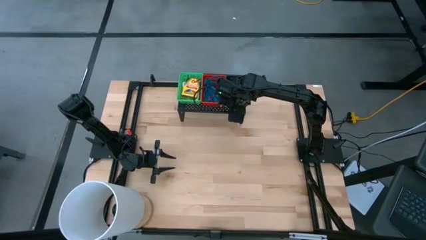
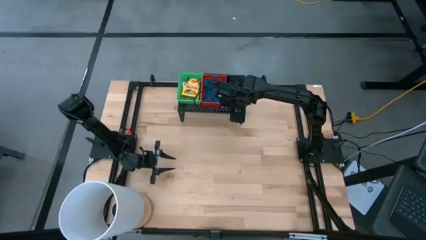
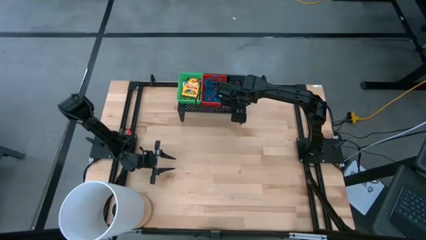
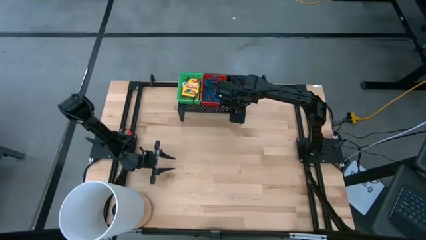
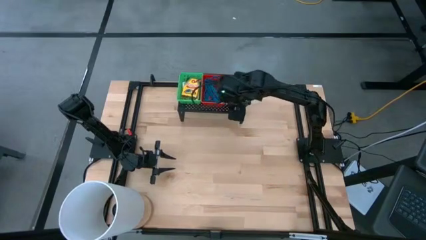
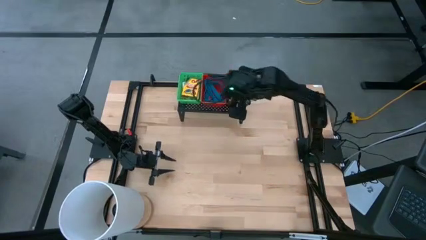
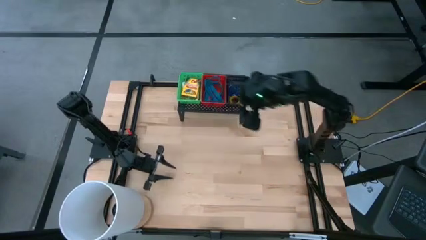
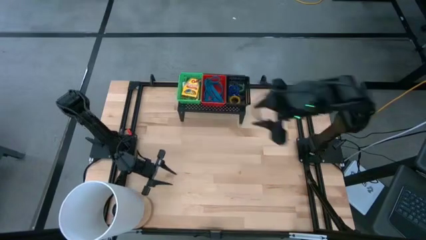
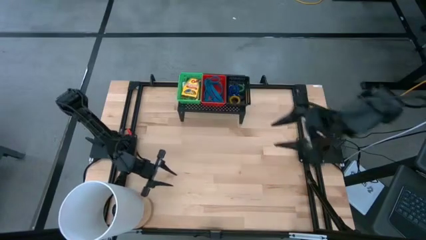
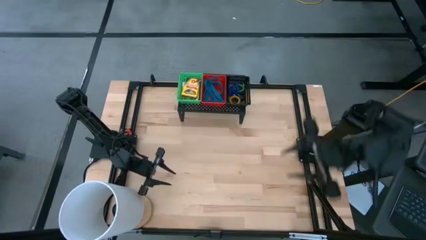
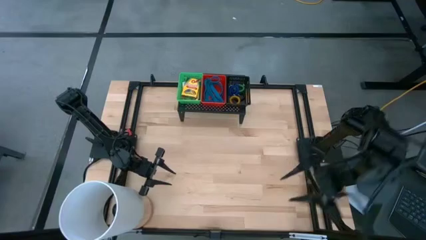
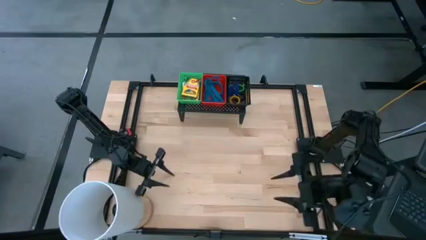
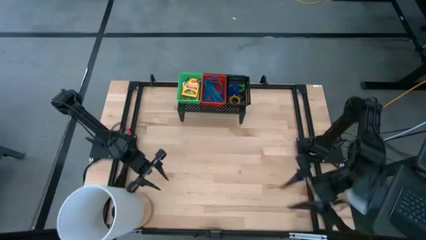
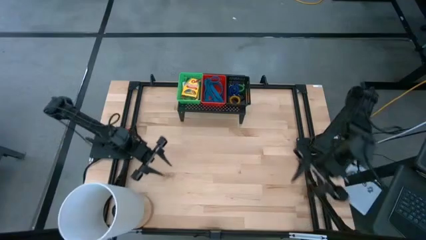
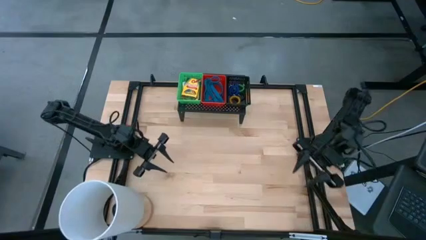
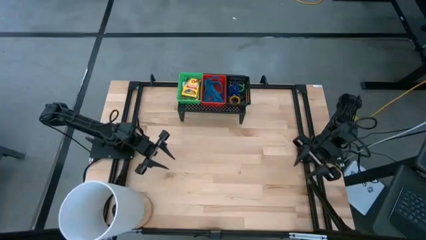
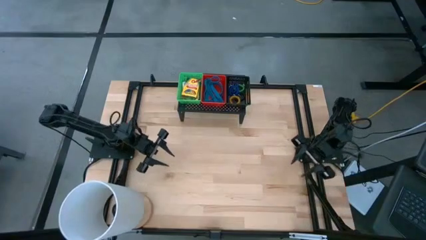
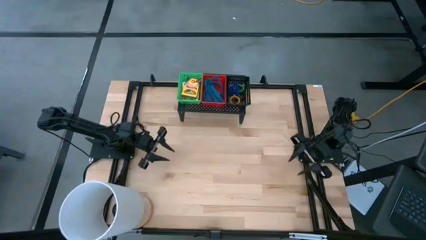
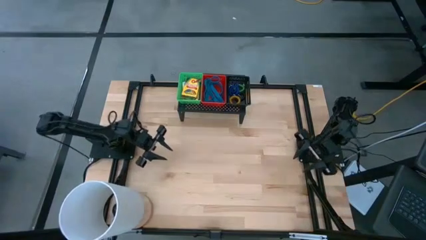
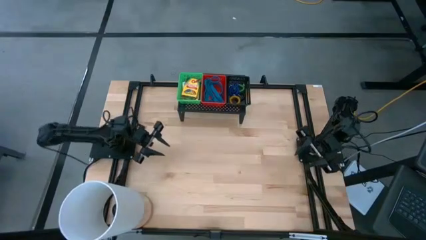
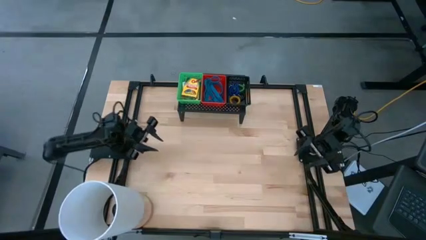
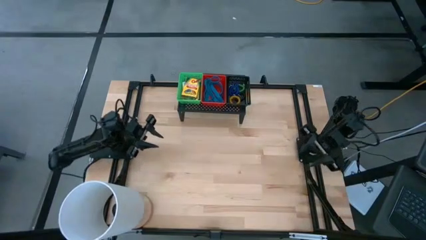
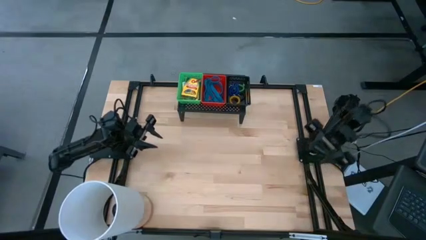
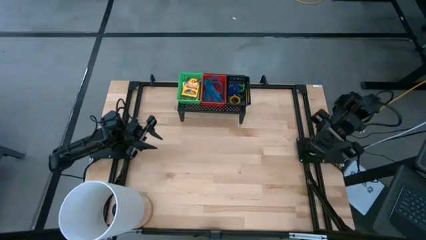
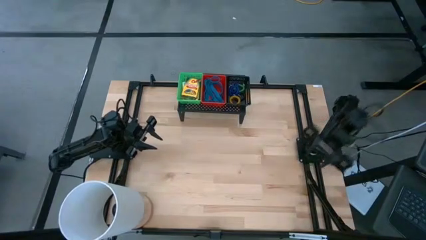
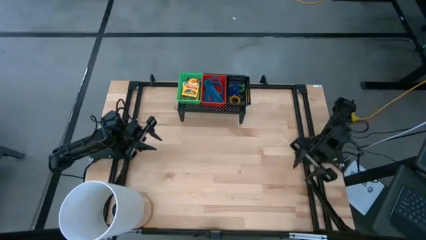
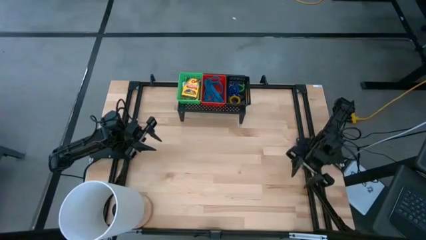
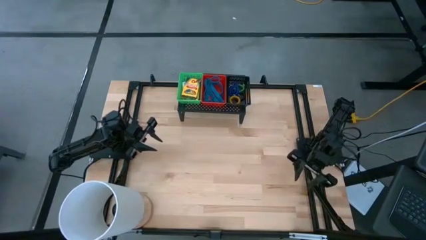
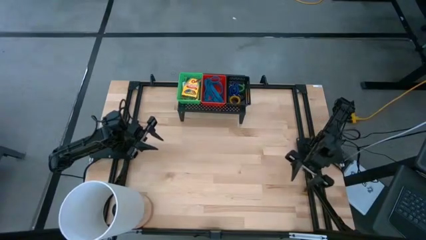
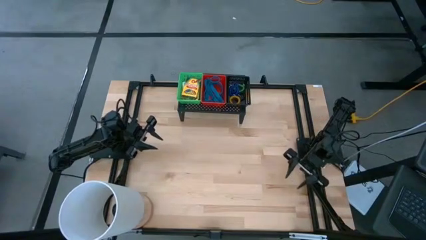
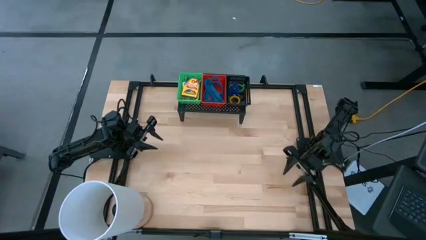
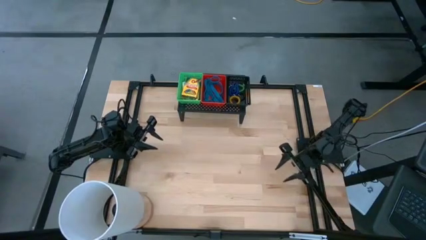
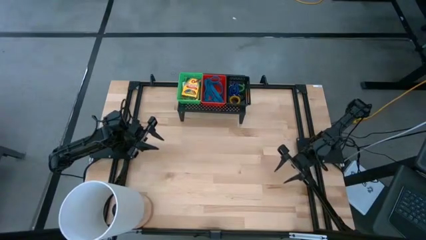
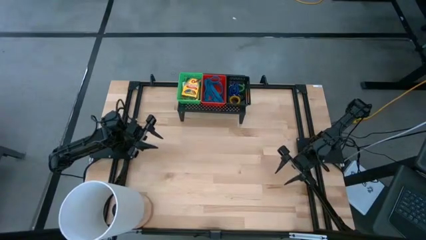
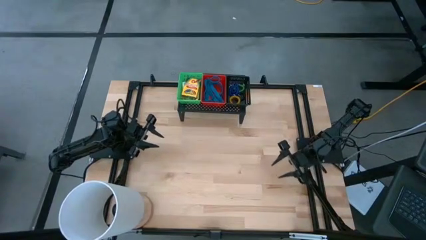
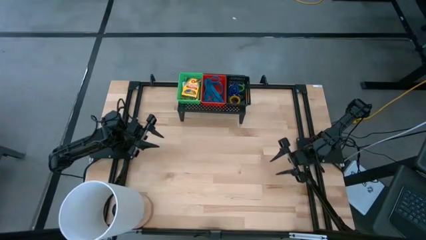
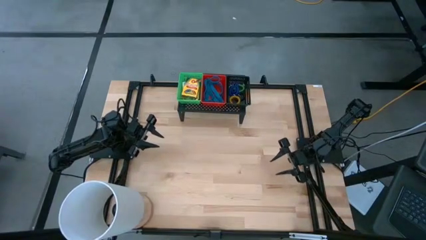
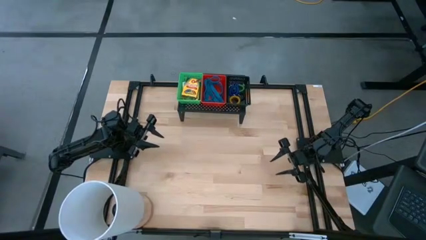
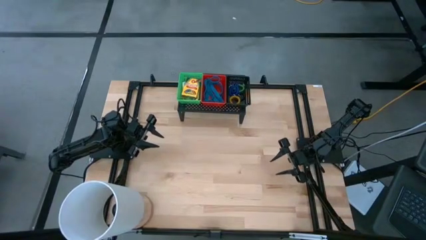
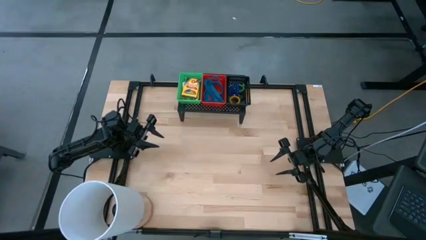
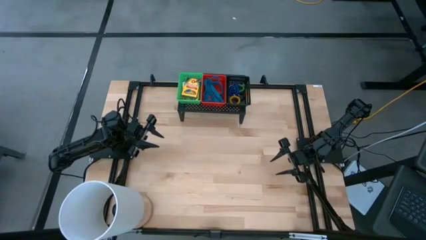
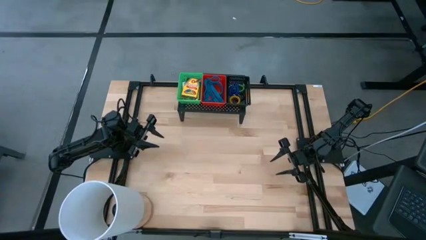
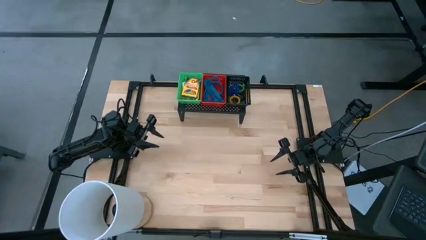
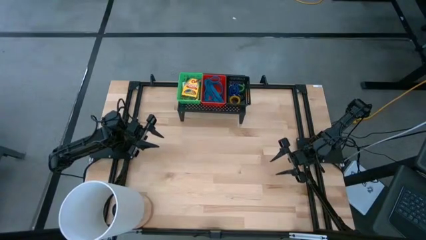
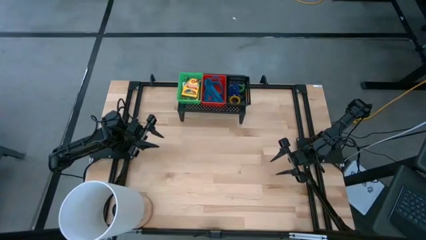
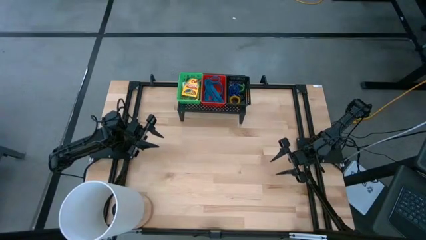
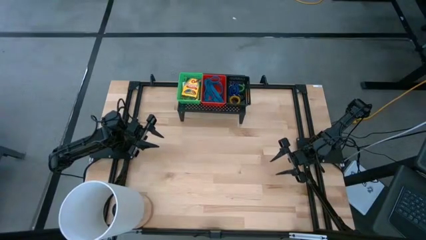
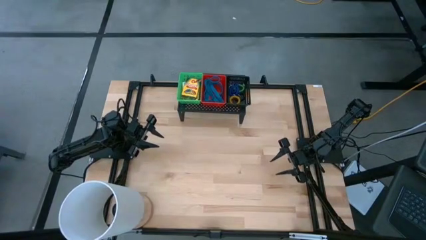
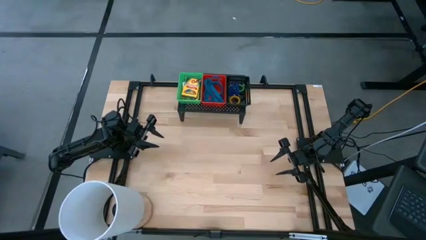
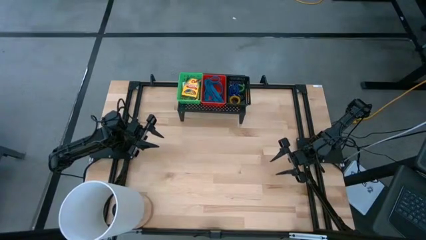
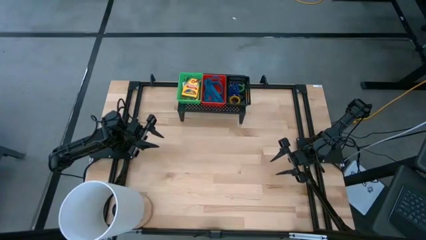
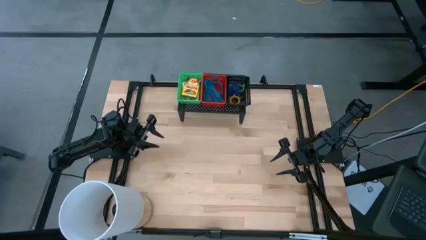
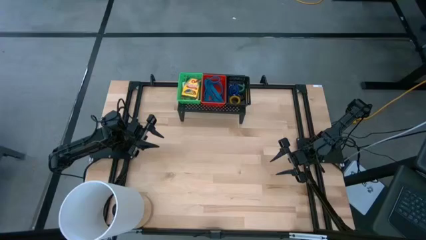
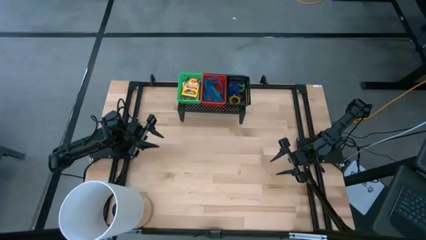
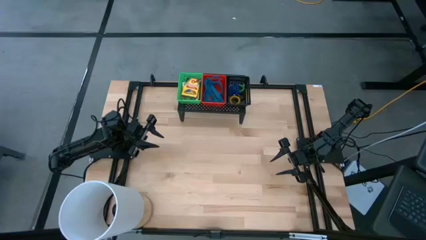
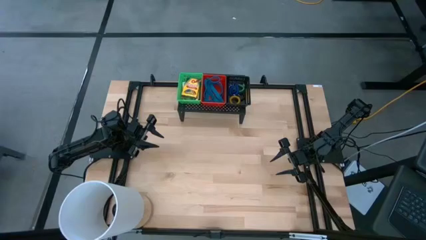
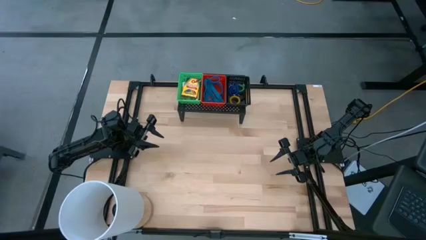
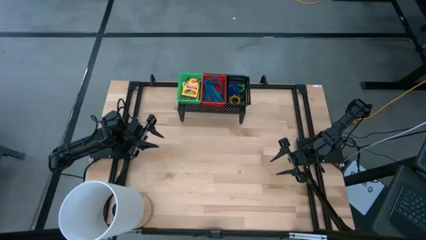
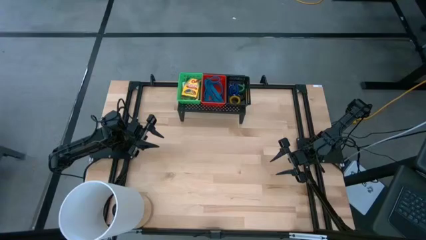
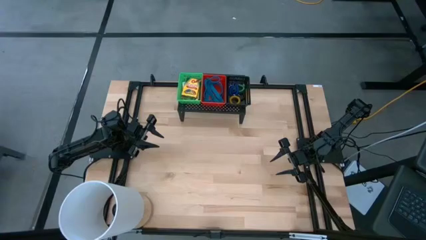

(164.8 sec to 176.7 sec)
Task: Pick & Place Office Desk Supplies
Return to Home Position
